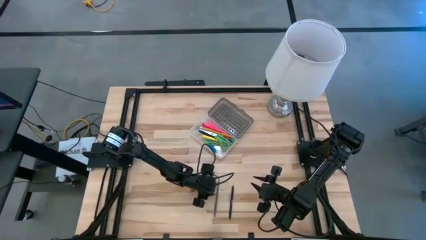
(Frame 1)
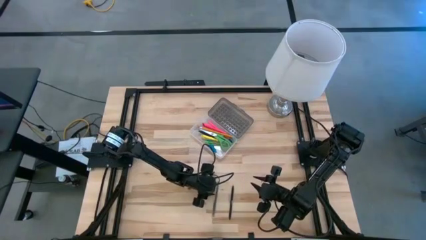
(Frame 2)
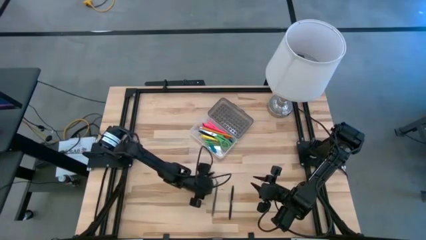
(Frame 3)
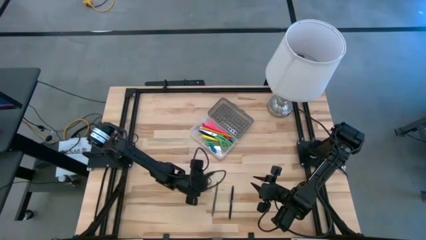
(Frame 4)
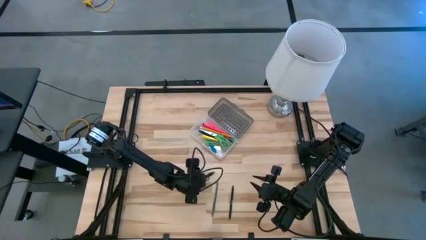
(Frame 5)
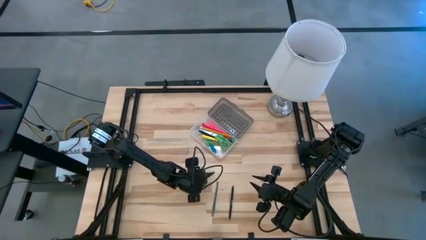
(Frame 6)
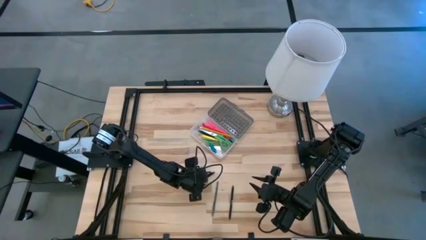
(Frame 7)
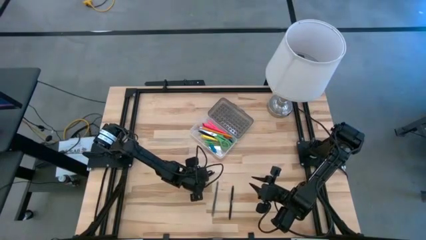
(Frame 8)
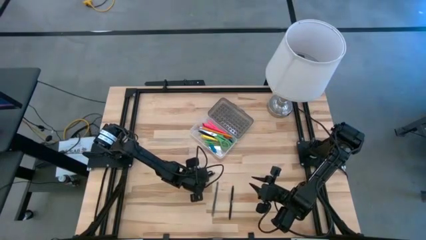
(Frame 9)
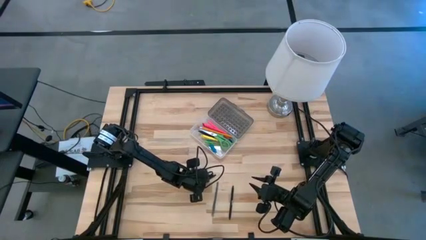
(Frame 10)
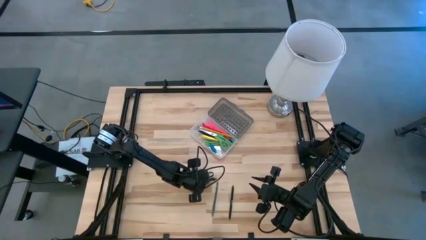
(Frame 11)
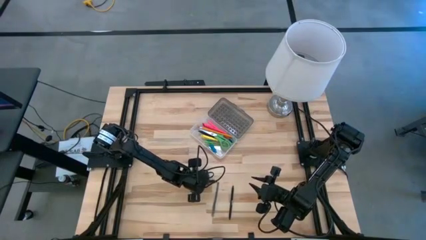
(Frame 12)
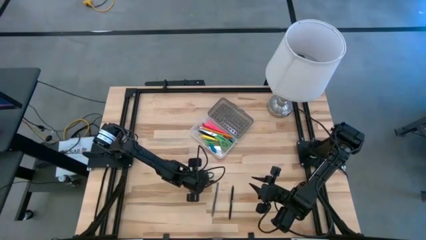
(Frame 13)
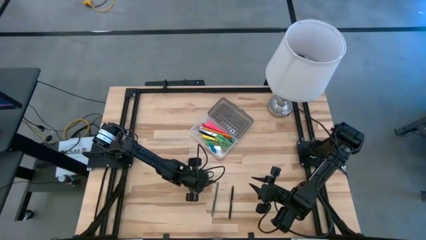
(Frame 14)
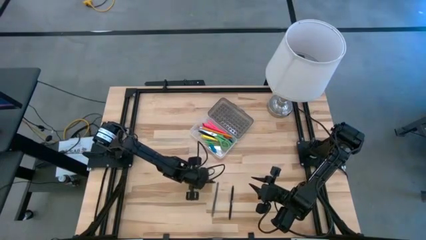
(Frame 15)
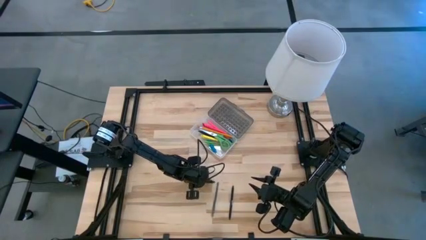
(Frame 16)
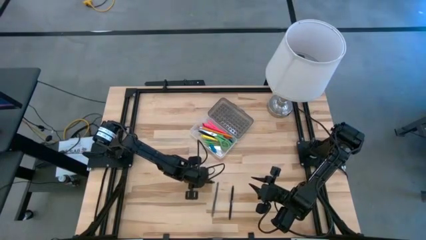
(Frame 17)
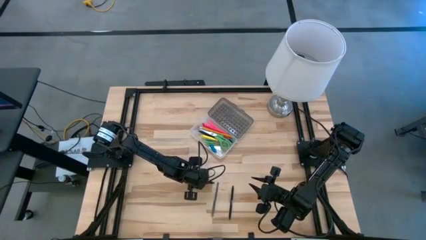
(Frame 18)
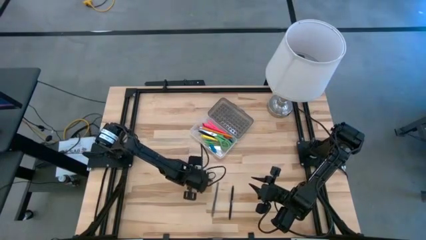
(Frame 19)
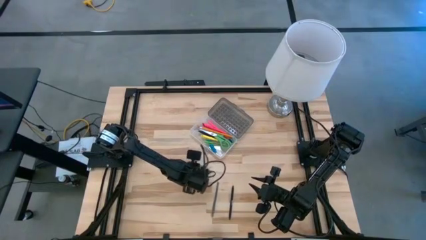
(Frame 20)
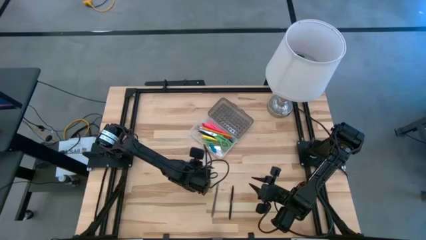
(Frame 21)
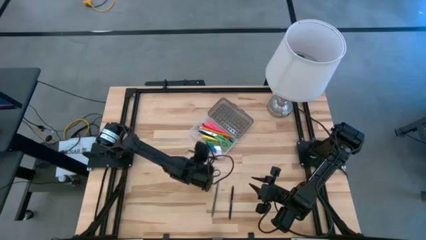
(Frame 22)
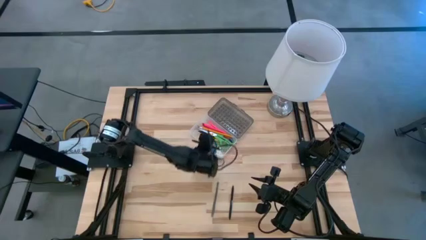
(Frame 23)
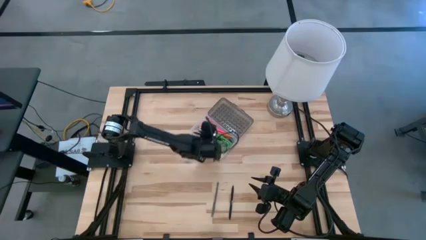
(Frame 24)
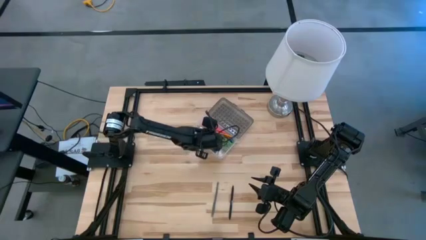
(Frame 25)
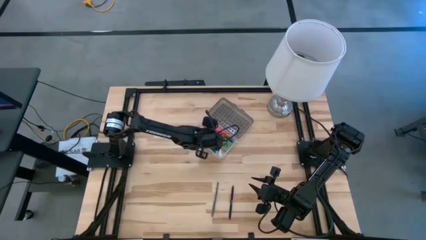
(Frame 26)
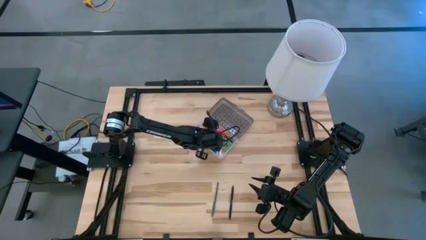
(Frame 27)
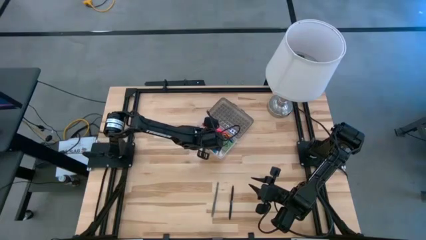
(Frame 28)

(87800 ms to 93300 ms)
Task: Pick & place school supplies into a supply box
Put the left black pen into the black supply box

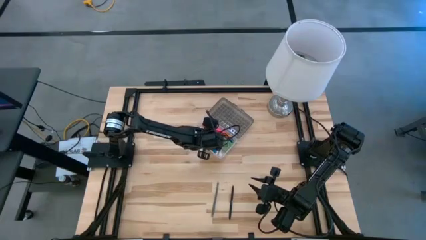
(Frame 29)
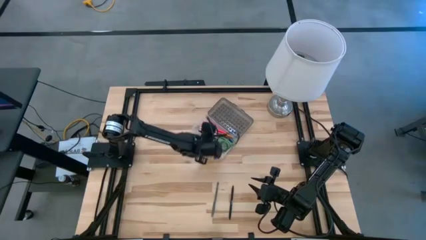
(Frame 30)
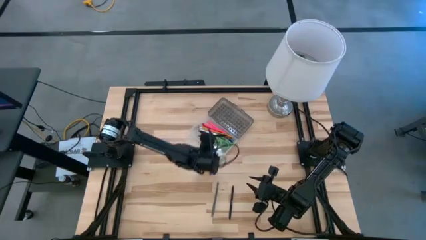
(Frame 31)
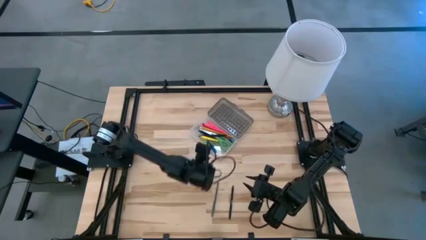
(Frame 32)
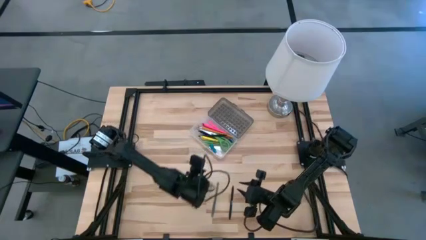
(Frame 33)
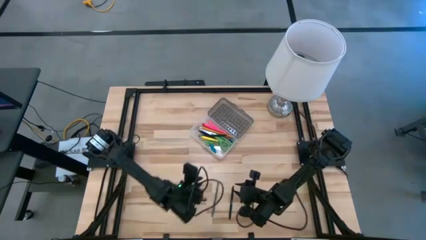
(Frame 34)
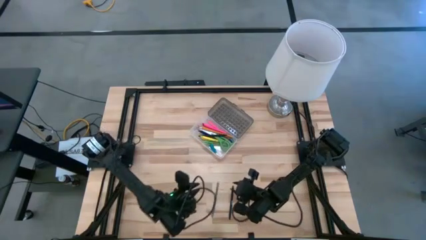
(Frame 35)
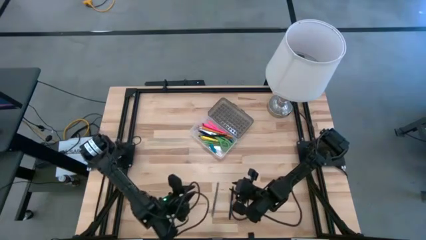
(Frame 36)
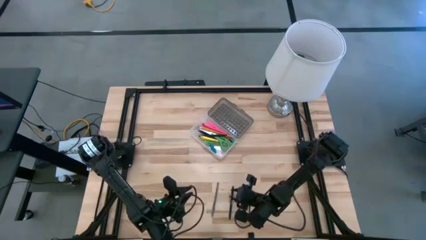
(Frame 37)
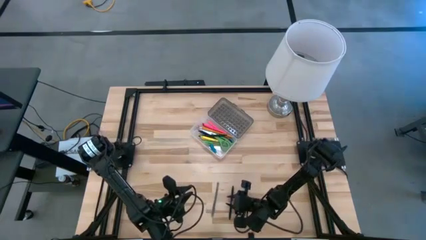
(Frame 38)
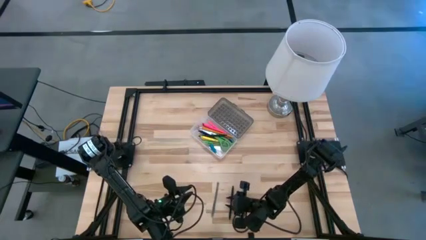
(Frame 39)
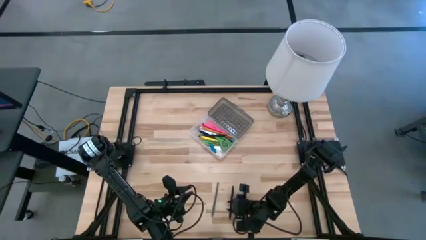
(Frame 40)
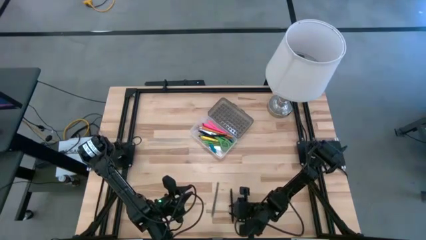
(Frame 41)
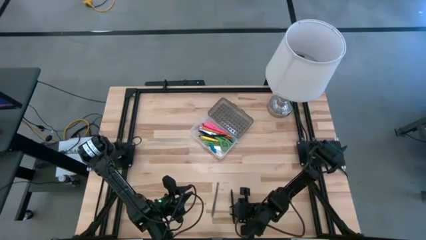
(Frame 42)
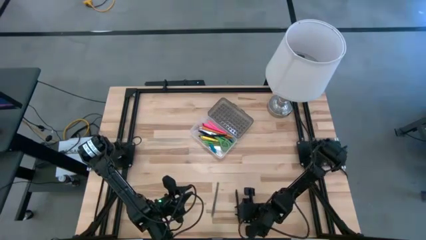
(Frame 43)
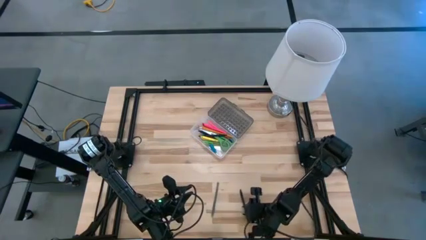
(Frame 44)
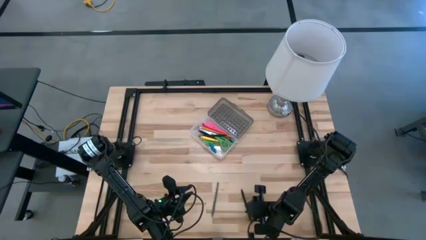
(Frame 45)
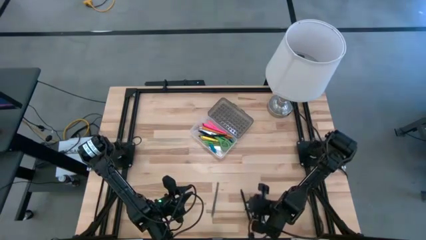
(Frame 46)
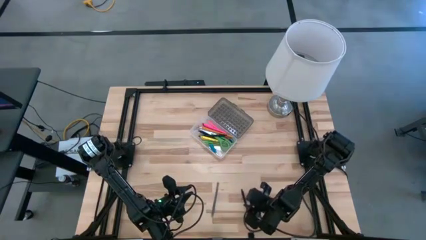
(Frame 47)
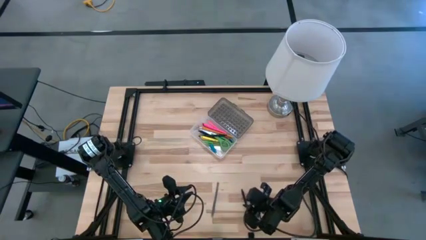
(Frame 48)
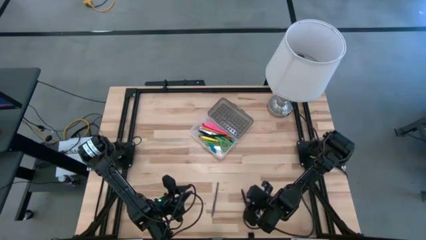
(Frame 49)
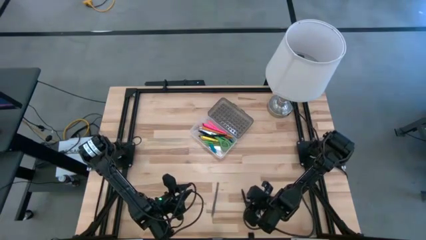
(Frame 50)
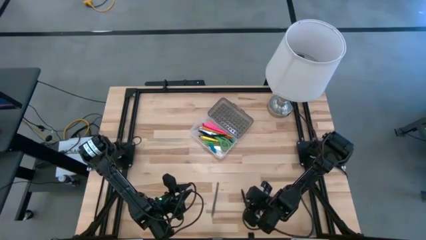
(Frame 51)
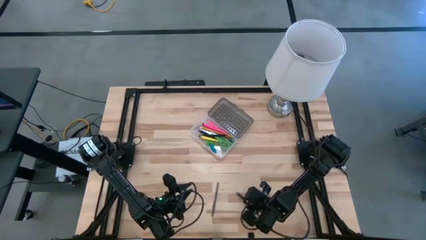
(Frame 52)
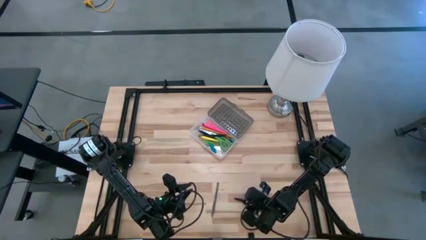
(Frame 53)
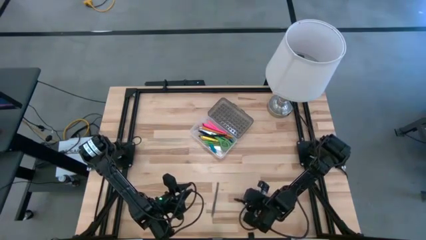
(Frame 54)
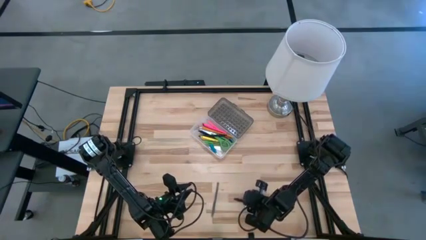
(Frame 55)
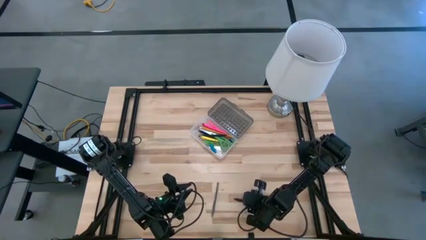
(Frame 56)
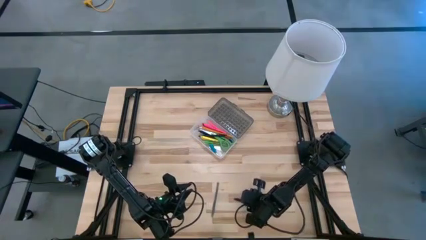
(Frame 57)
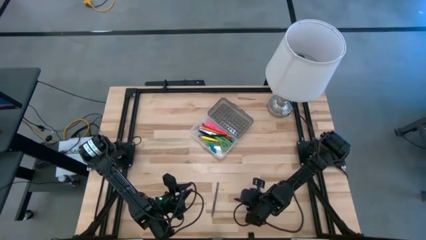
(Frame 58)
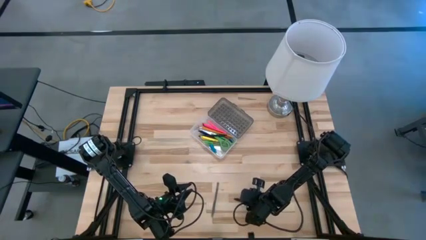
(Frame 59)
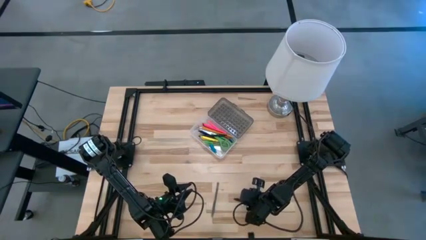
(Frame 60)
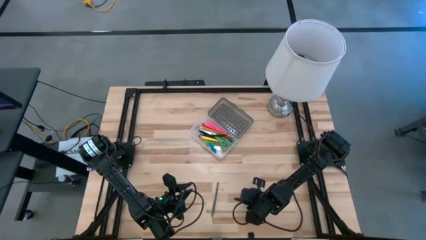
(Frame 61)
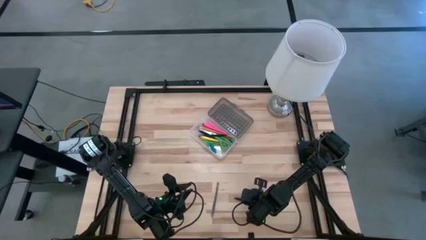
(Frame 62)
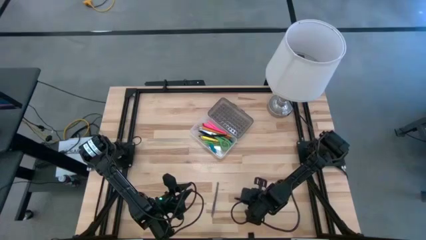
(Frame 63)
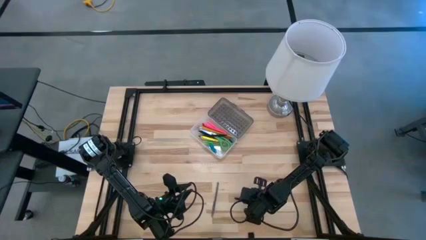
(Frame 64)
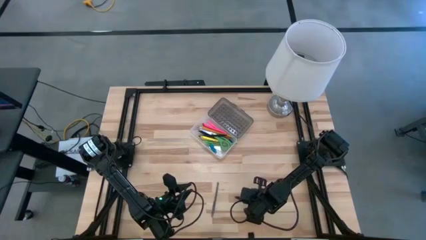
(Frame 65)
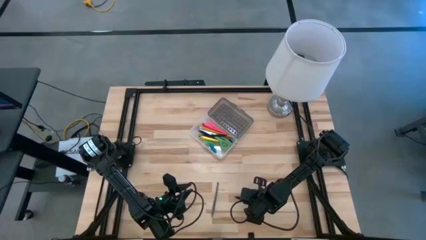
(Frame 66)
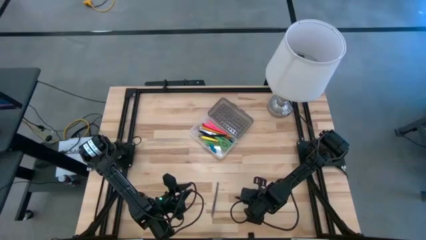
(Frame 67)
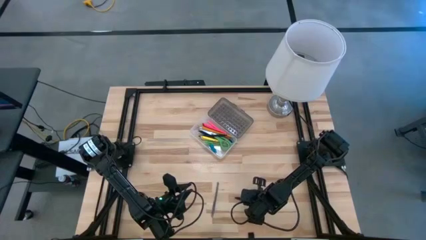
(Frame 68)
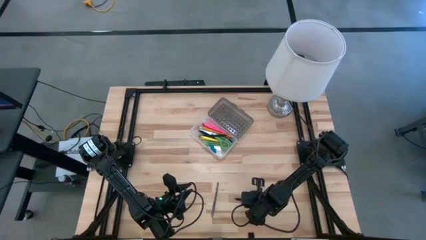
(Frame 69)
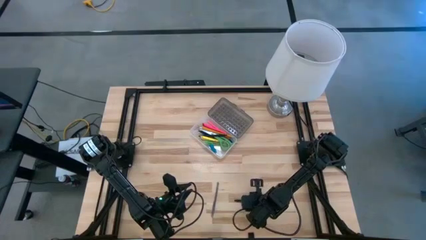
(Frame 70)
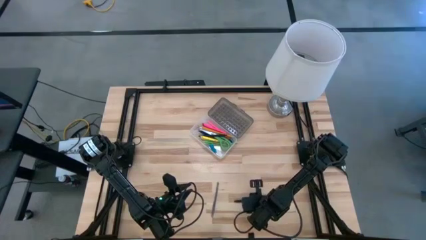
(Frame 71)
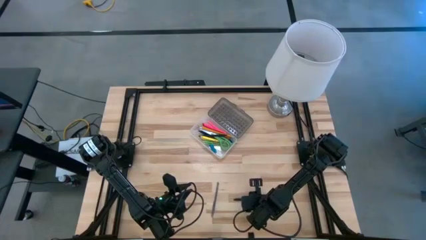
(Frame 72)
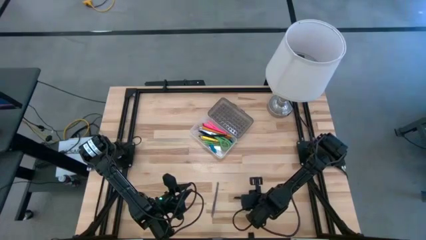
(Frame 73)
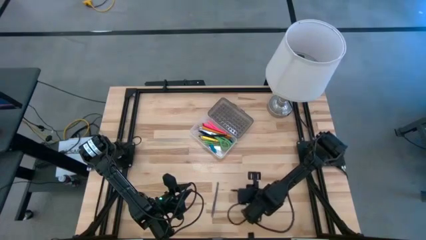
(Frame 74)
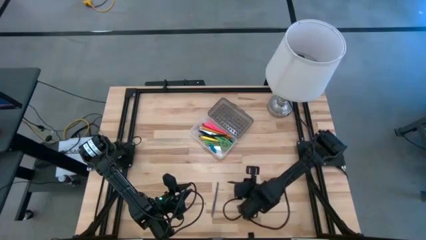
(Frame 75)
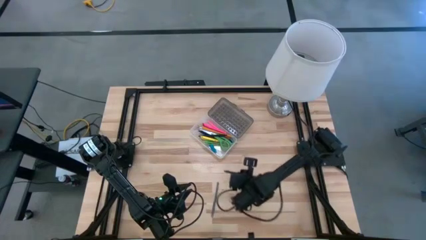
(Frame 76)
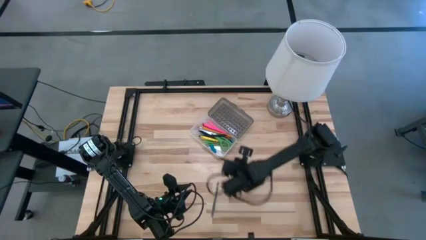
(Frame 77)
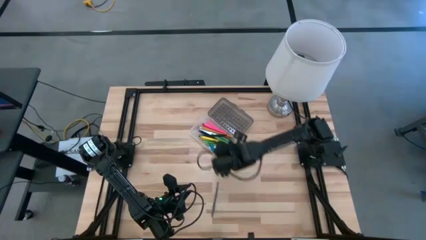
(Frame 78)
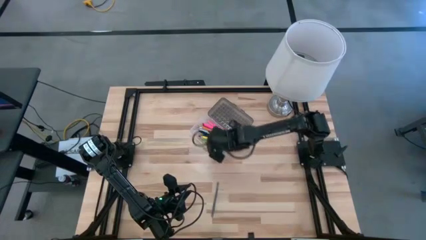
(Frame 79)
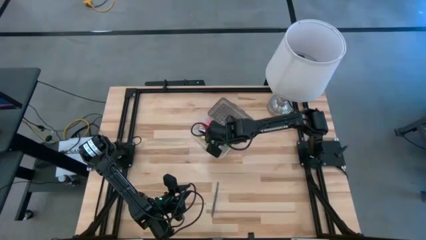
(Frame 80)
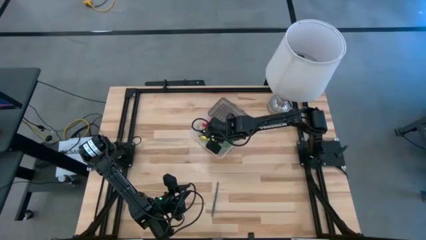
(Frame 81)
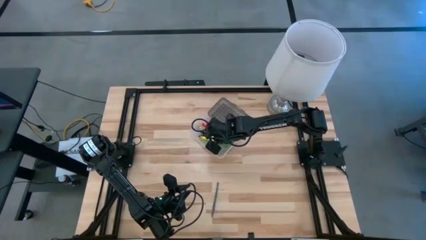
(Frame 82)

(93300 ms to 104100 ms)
Put the black pen into the black supply box

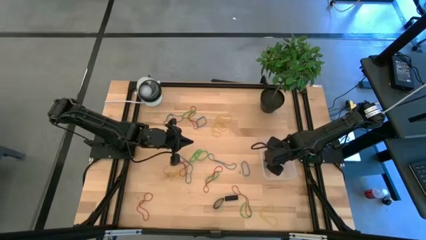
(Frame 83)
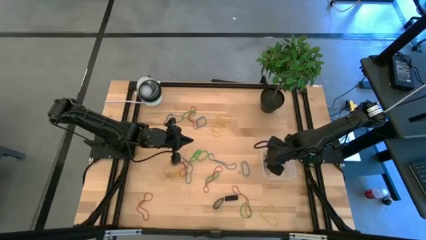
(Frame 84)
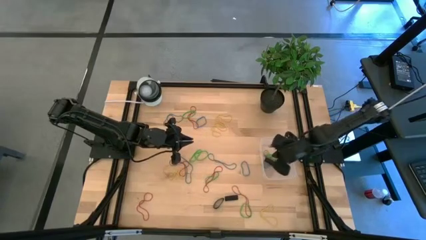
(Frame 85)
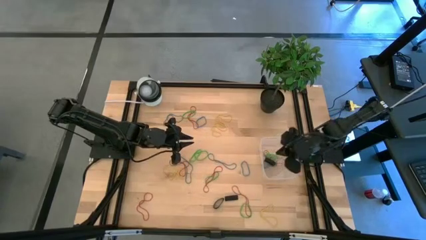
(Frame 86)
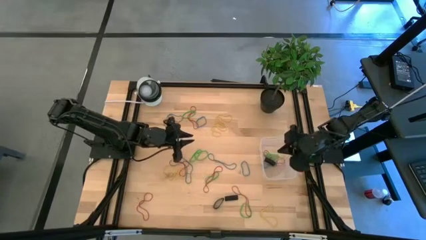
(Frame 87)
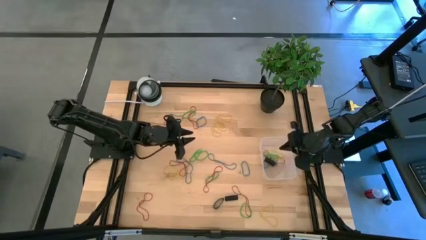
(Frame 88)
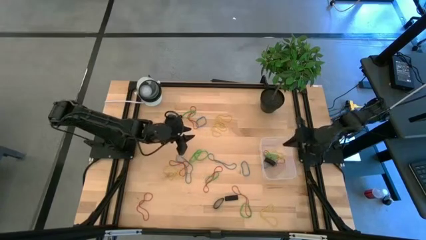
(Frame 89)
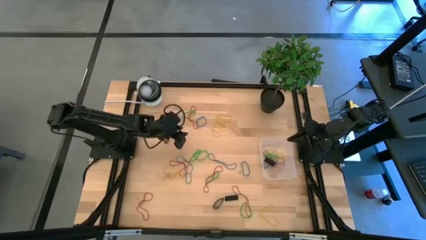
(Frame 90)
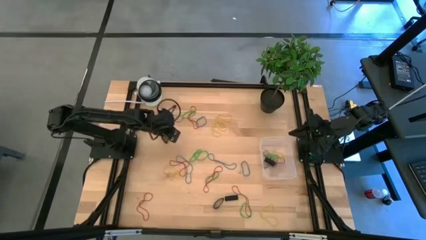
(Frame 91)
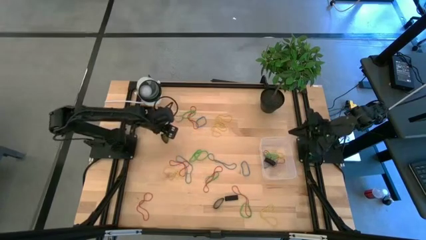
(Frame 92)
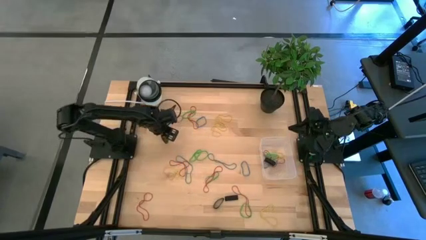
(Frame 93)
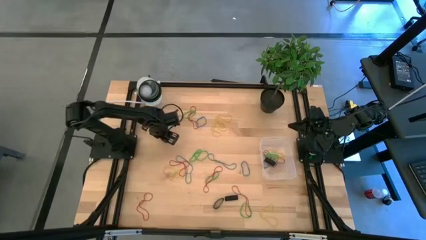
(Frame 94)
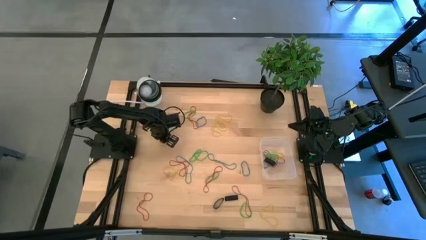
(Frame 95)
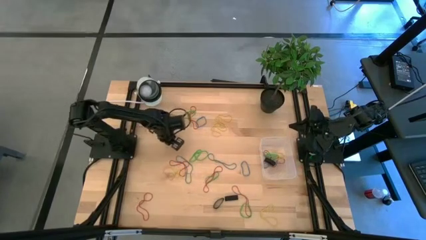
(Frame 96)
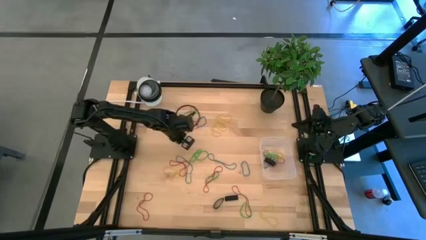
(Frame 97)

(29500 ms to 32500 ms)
Task: Pick and place rubber bands into bin
Put the black rubber band into the transparent bin
